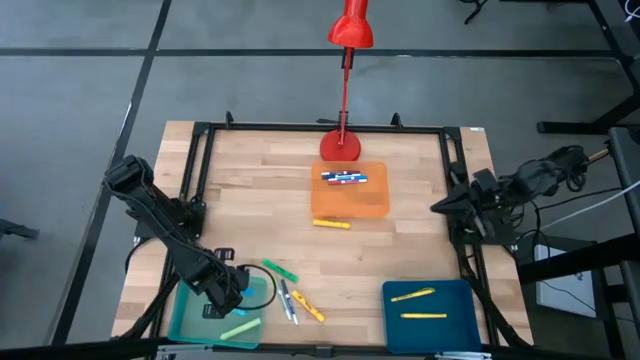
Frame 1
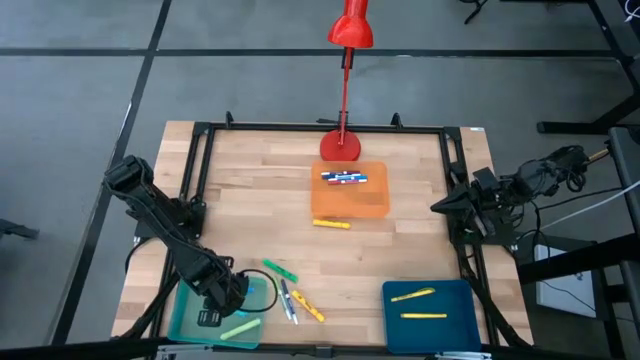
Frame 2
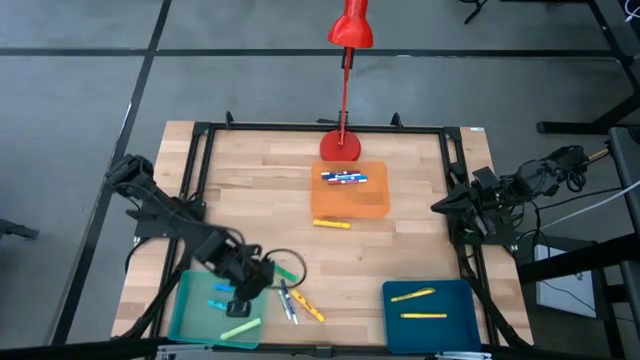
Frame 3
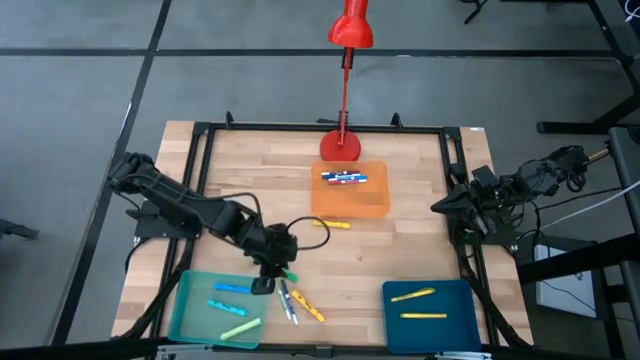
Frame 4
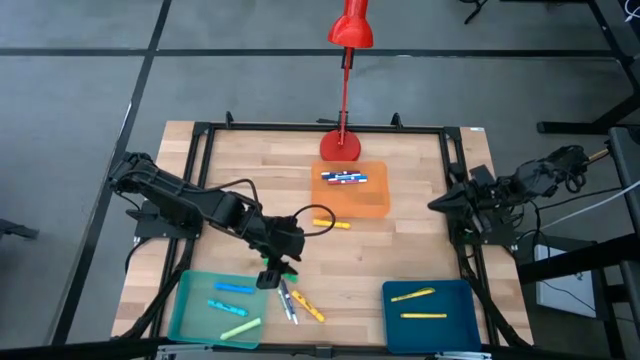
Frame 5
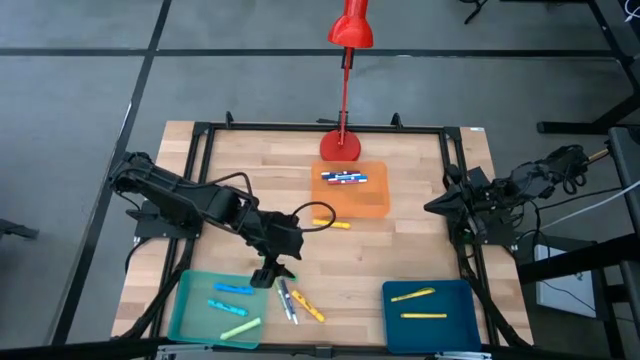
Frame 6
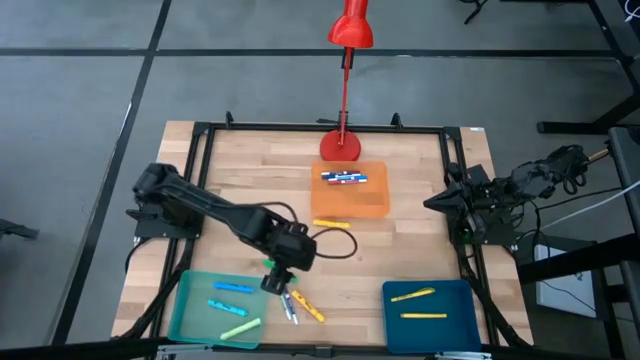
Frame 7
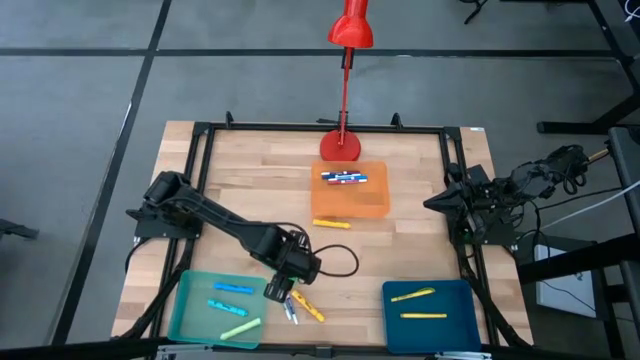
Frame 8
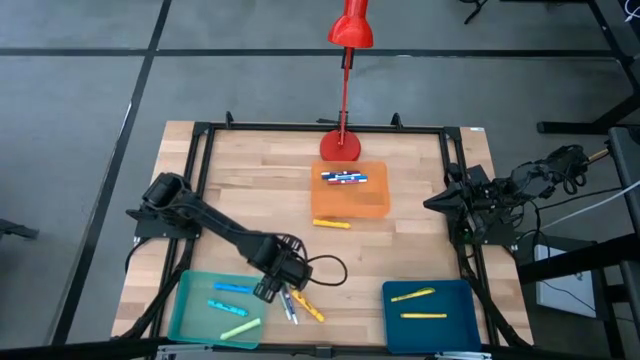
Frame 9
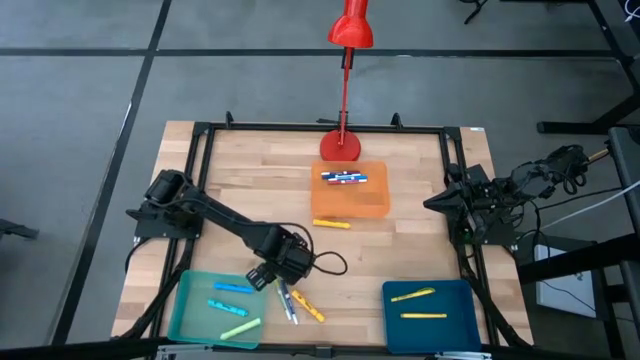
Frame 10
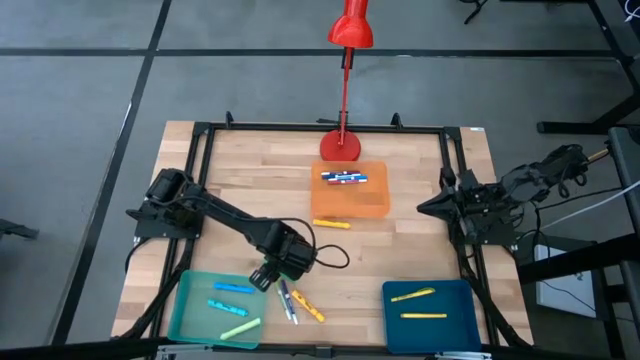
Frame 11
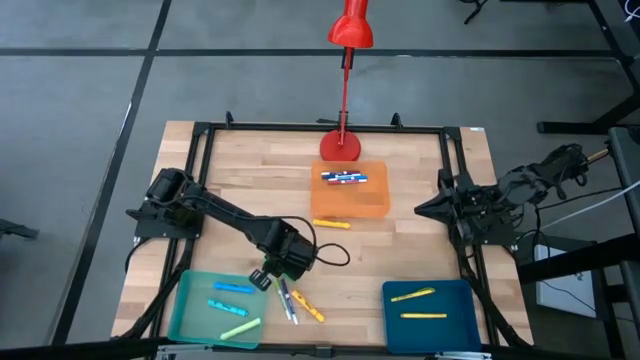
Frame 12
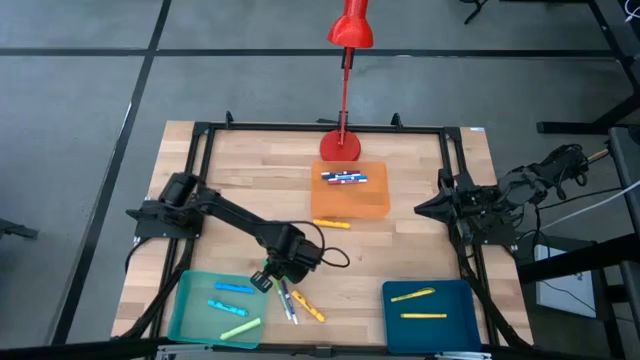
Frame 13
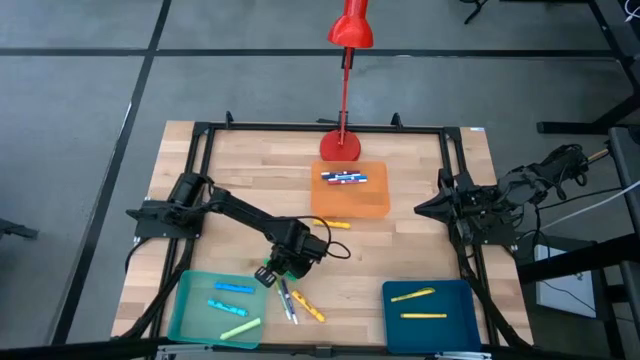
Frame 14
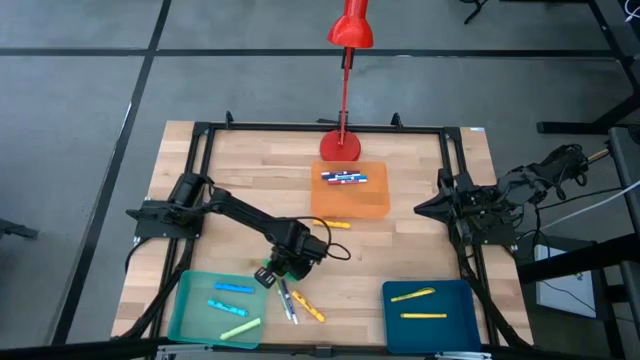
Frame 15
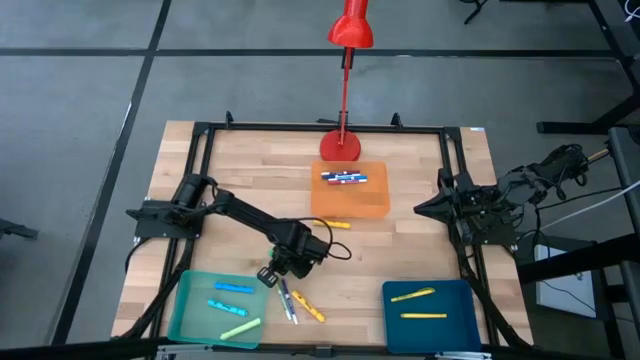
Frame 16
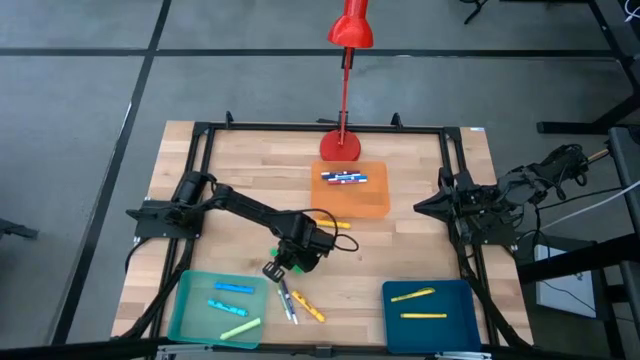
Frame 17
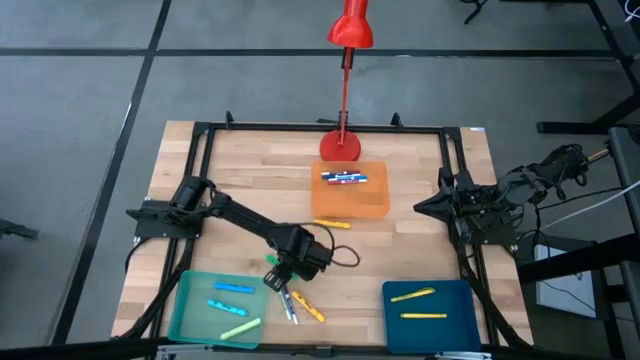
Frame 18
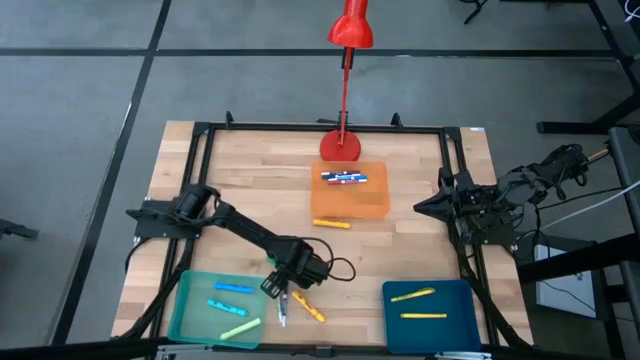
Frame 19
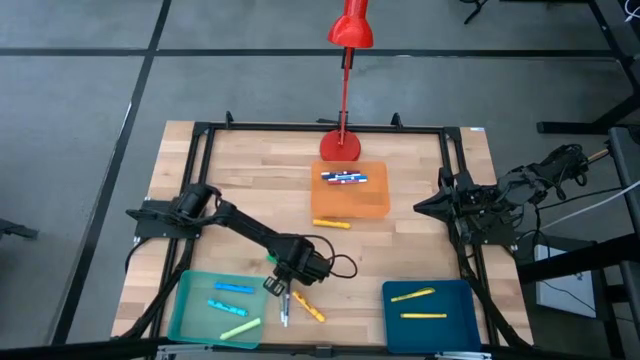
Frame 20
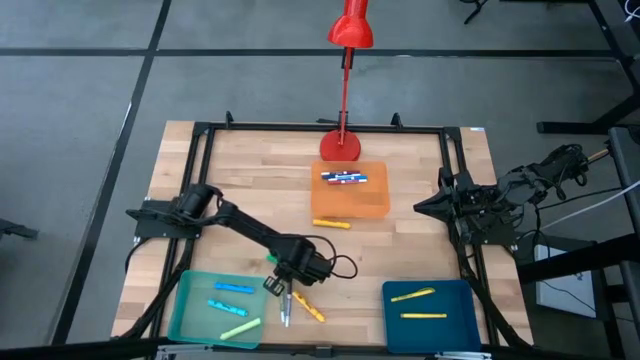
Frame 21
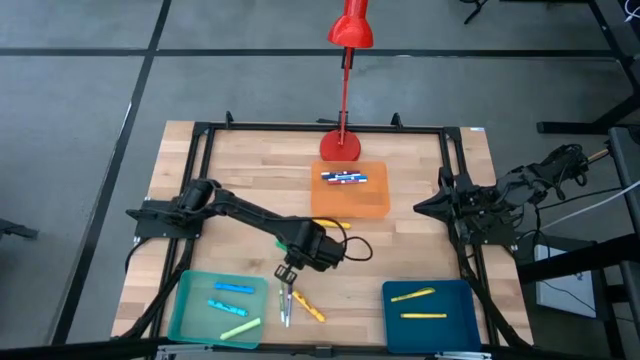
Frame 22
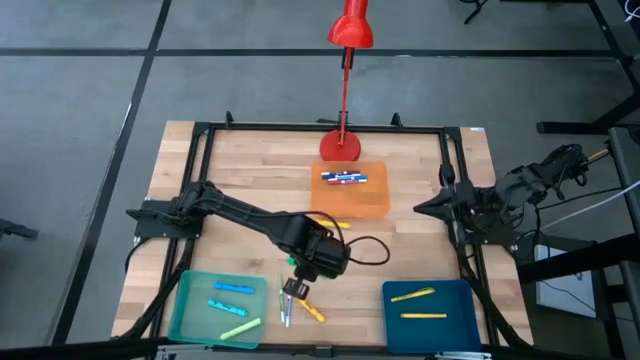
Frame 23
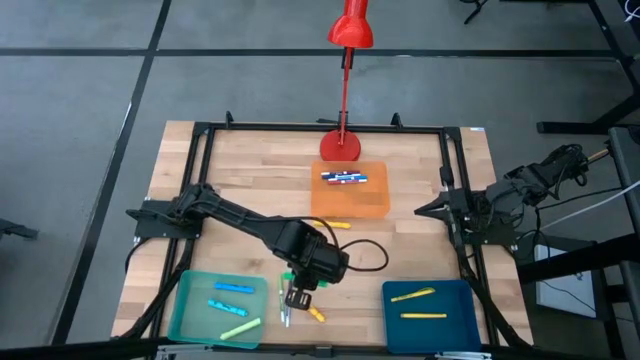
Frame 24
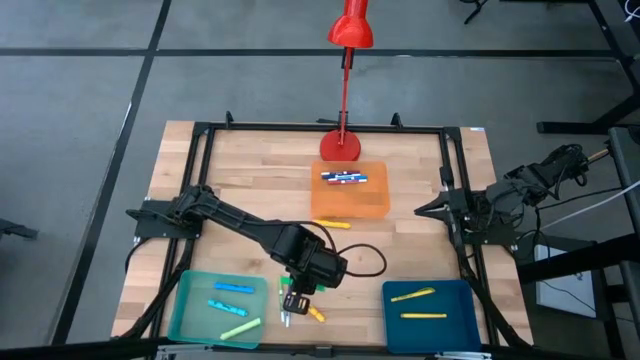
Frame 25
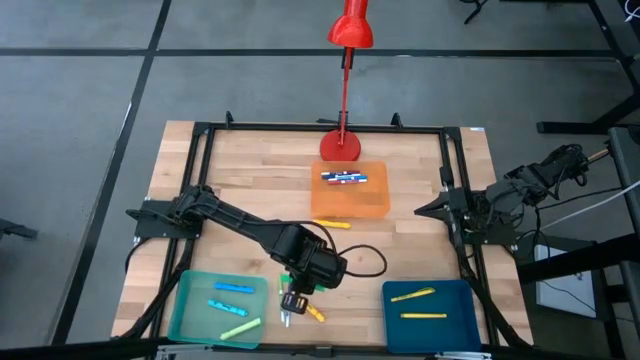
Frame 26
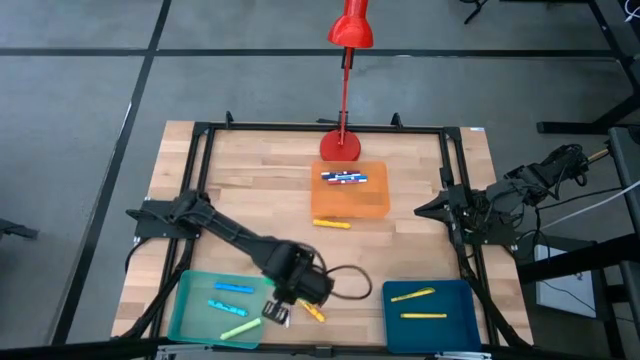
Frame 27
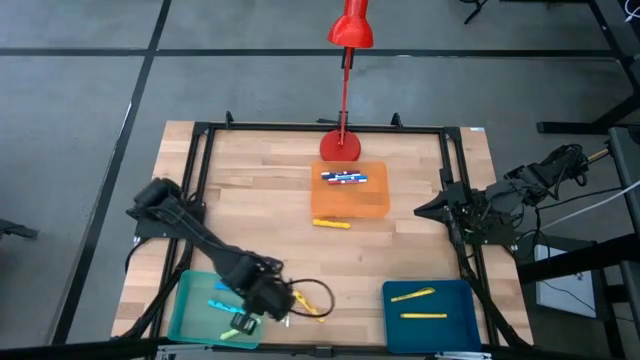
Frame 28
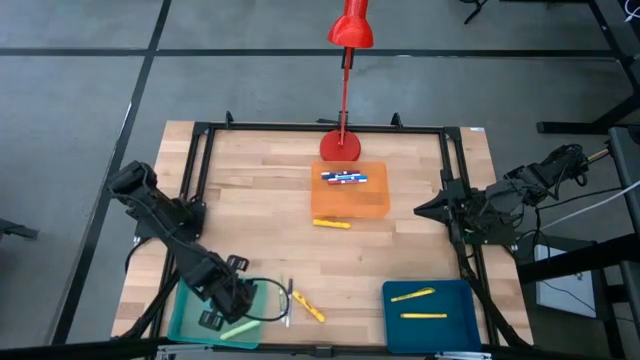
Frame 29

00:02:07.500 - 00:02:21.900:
Task: Pick & Place Markers
Put the green highlighter pen into the green bin

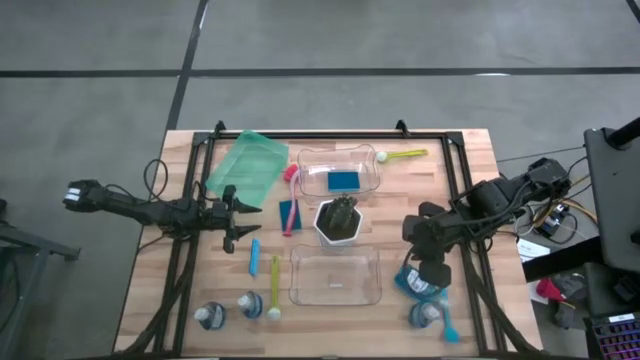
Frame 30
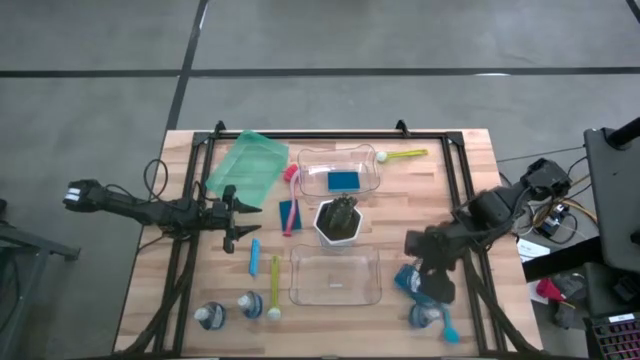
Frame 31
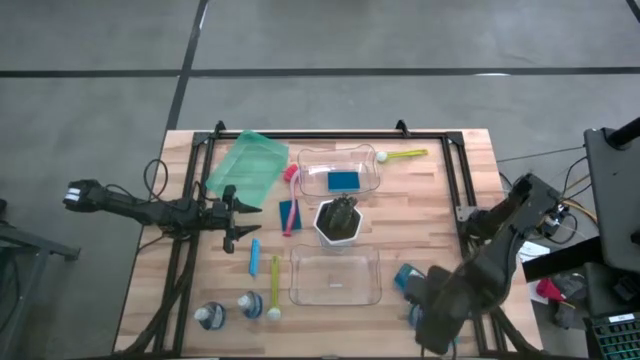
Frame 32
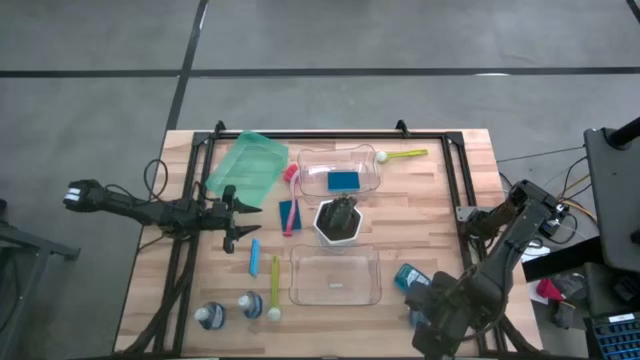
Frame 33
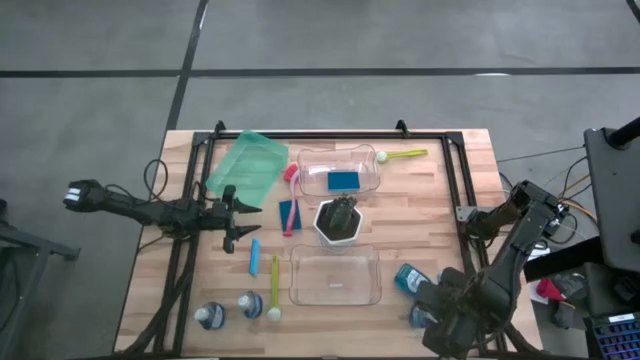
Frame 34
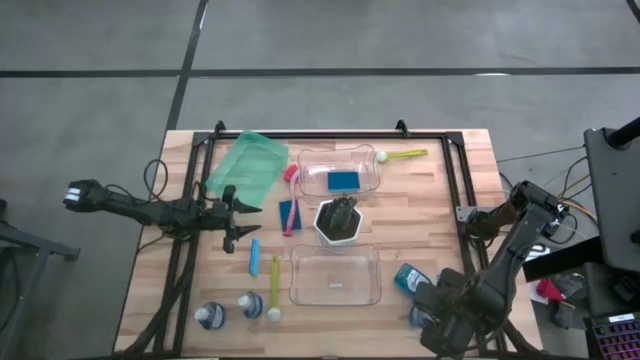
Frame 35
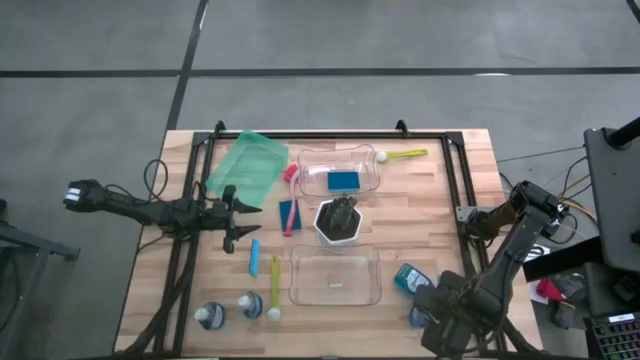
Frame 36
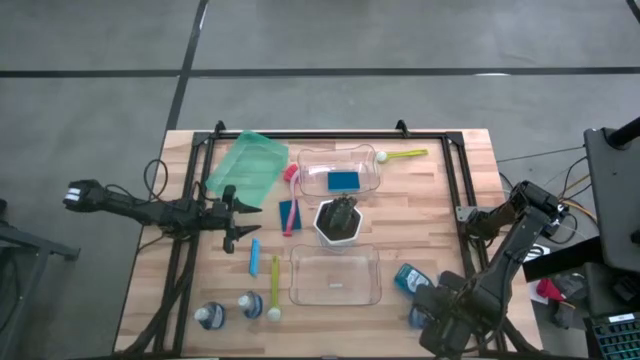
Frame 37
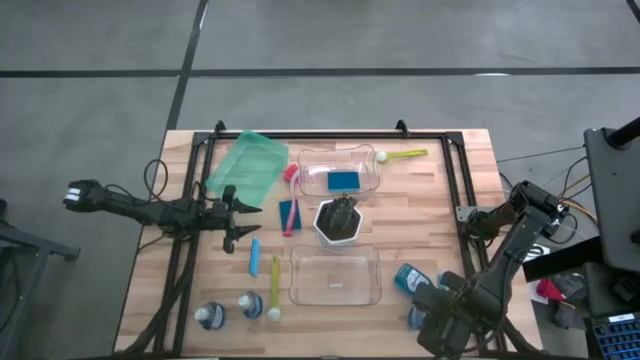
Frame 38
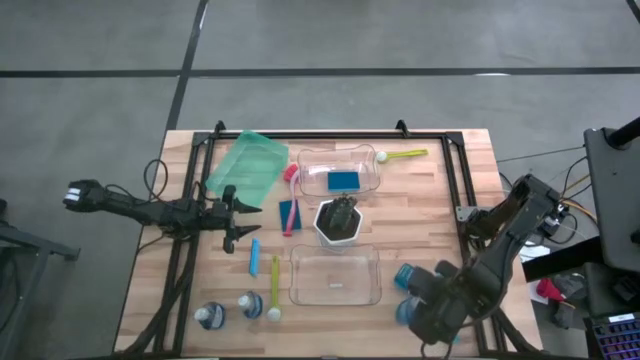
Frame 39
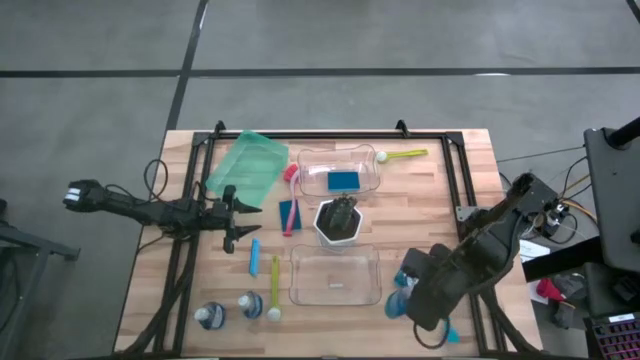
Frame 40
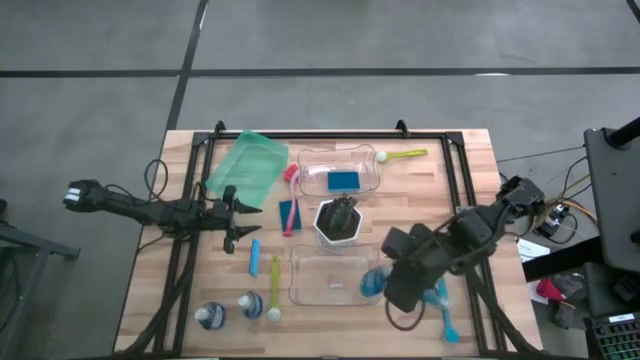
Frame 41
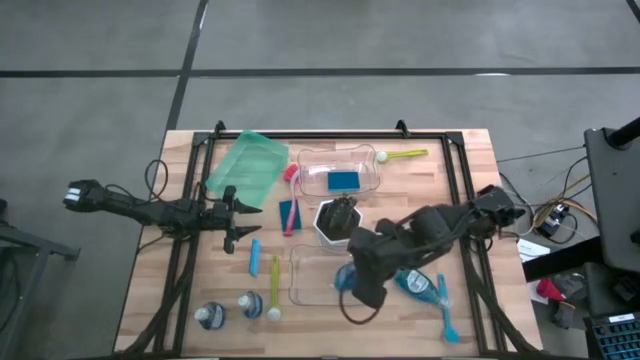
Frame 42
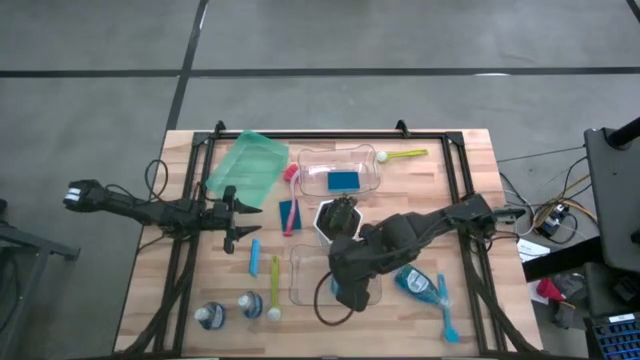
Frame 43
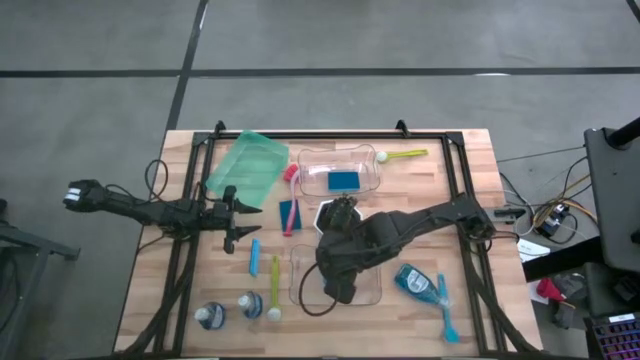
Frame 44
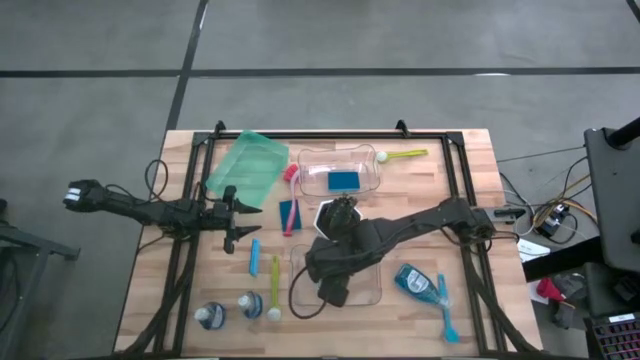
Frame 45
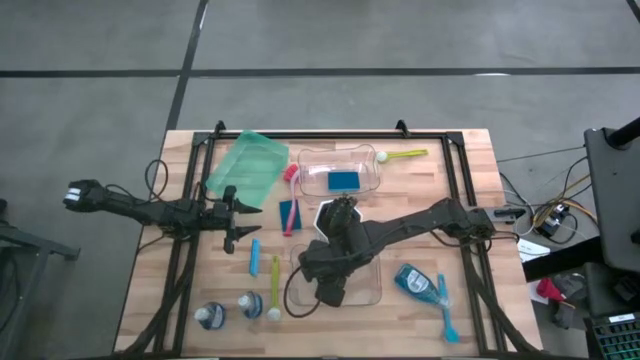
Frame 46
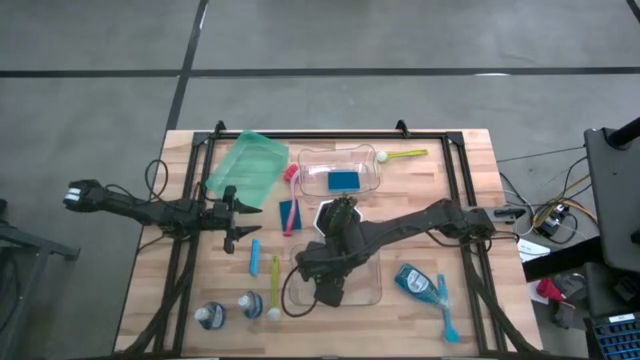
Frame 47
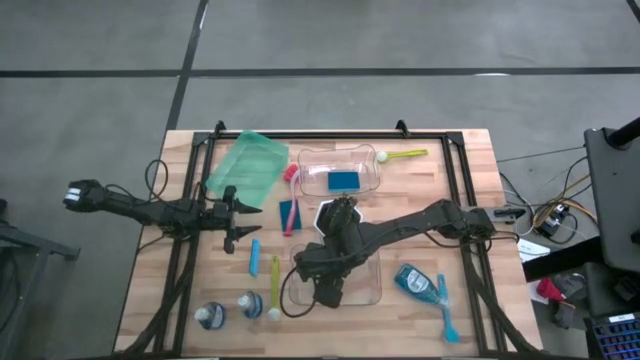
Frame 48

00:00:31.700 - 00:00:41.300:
Task: Pick & Place Kitchen Sink Supplies
Put the blue dishwashing liquid bottle into the bottom transparent bin
